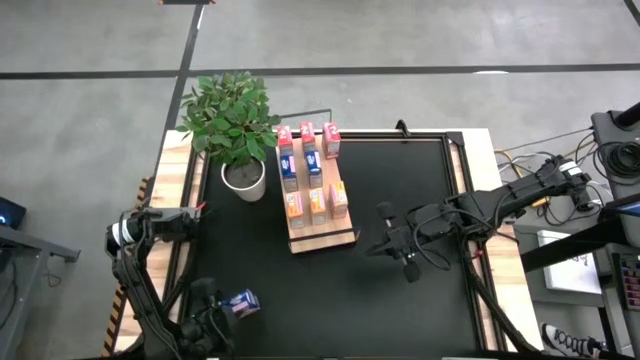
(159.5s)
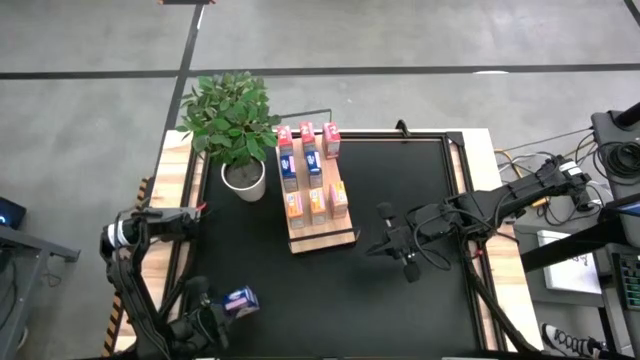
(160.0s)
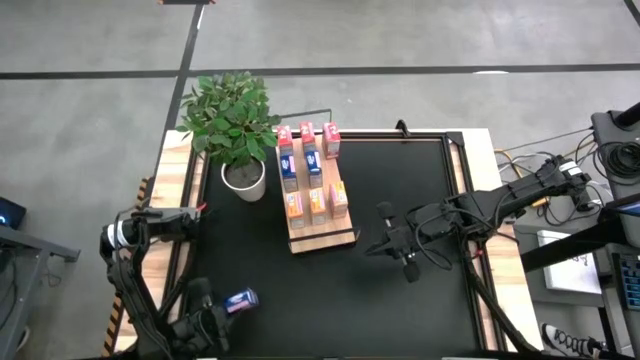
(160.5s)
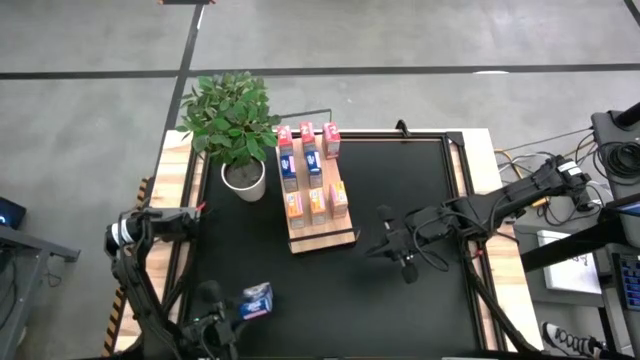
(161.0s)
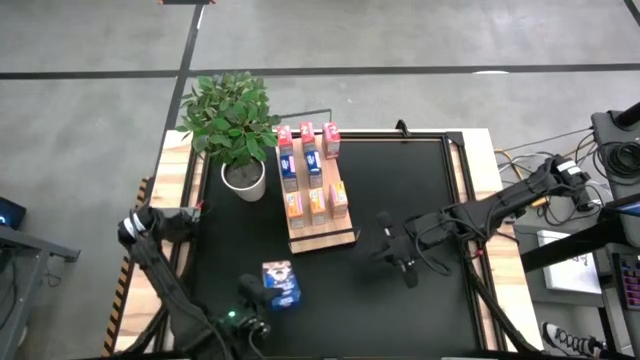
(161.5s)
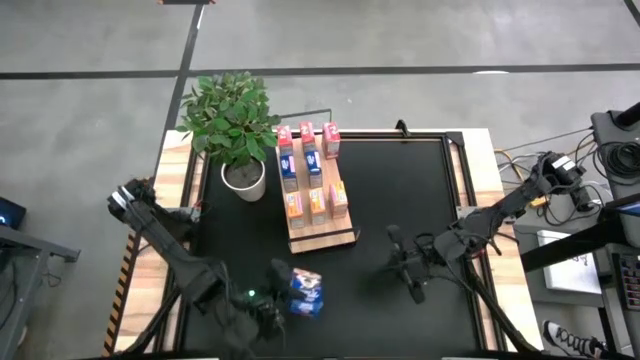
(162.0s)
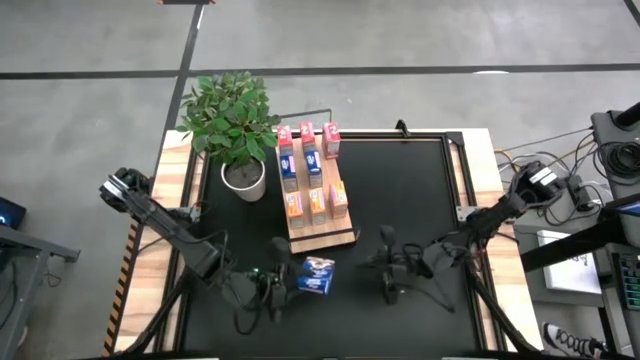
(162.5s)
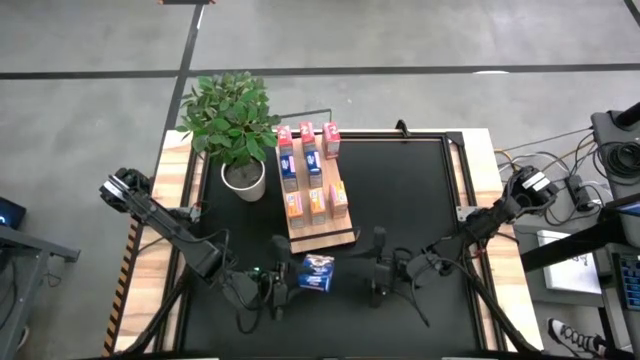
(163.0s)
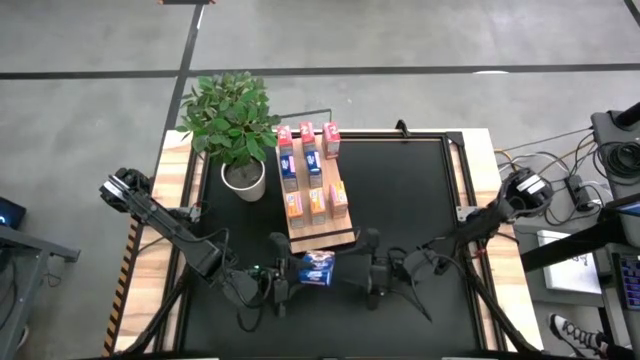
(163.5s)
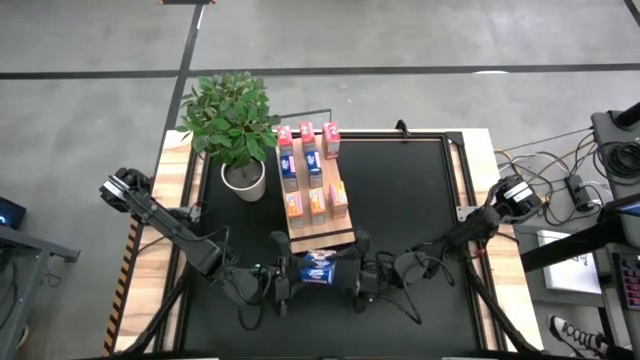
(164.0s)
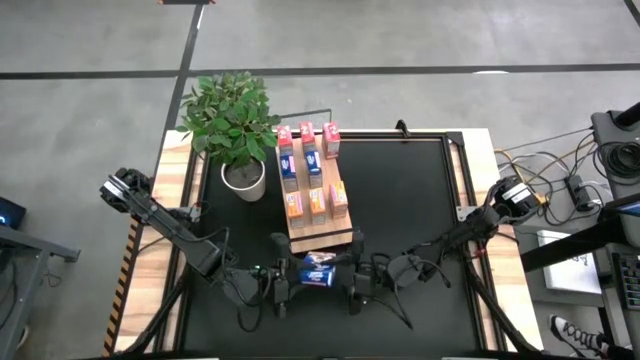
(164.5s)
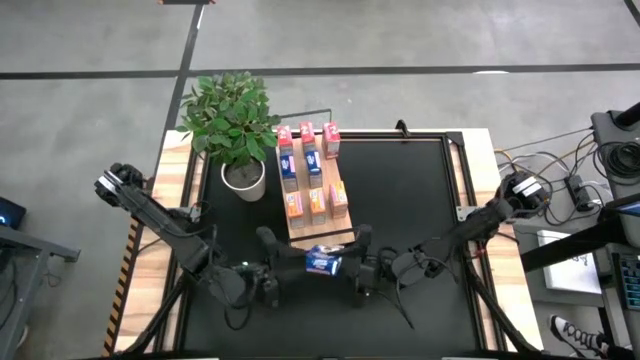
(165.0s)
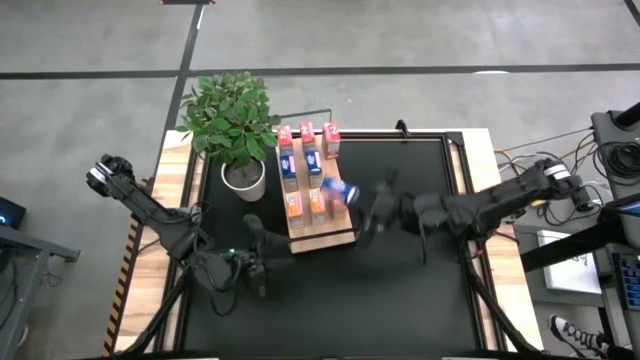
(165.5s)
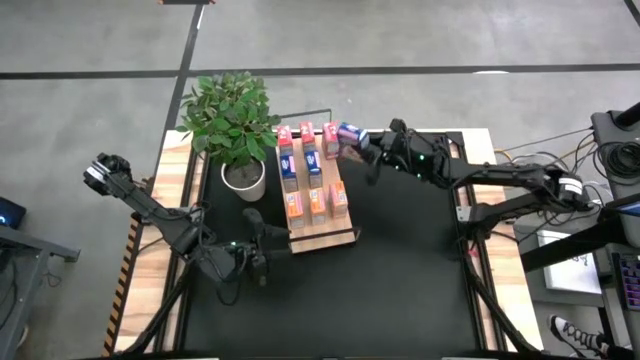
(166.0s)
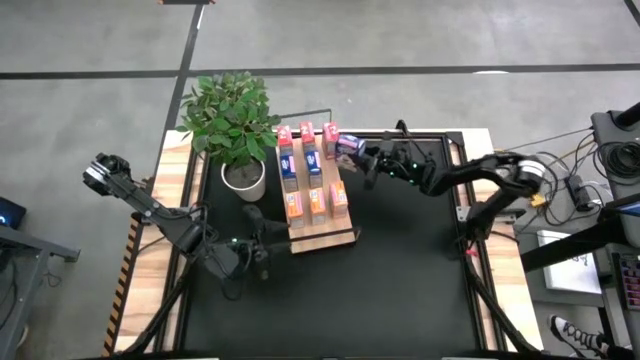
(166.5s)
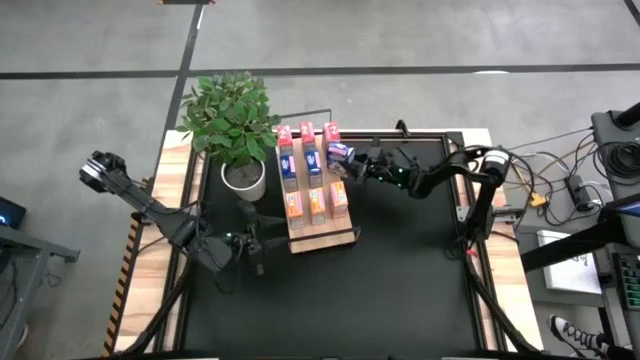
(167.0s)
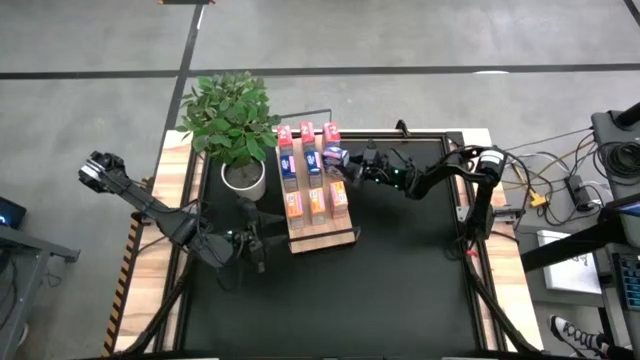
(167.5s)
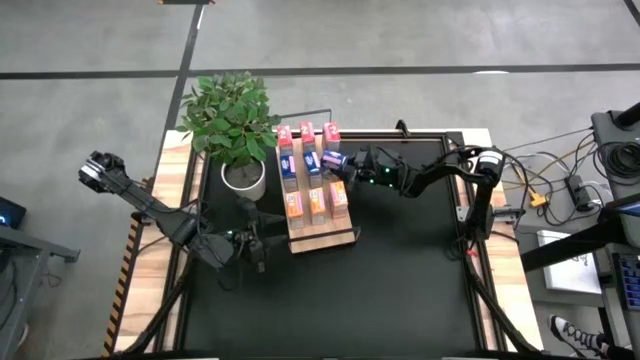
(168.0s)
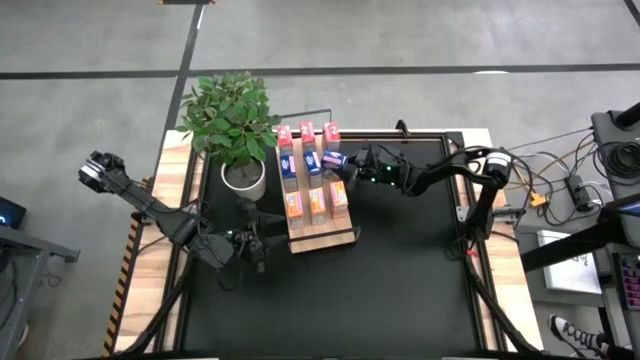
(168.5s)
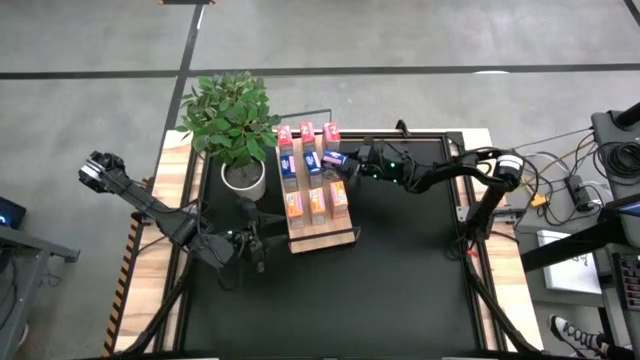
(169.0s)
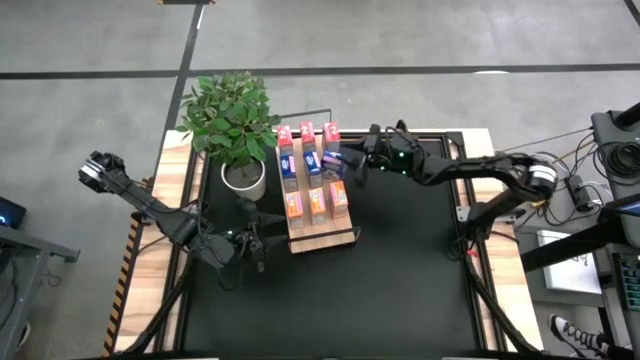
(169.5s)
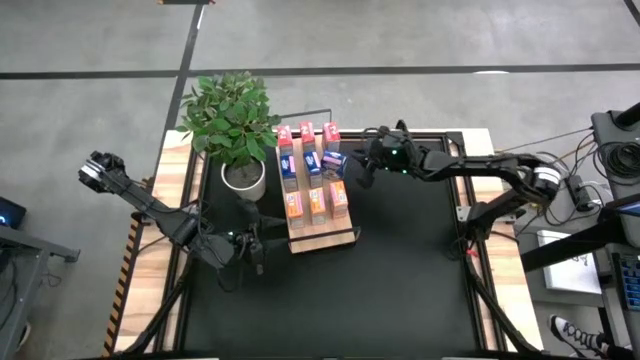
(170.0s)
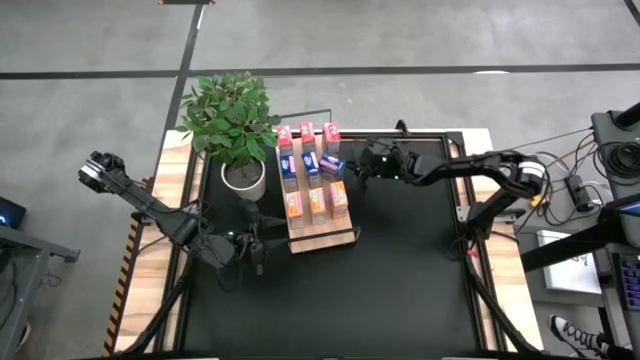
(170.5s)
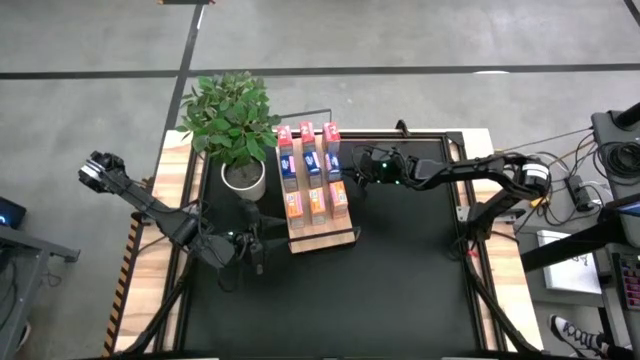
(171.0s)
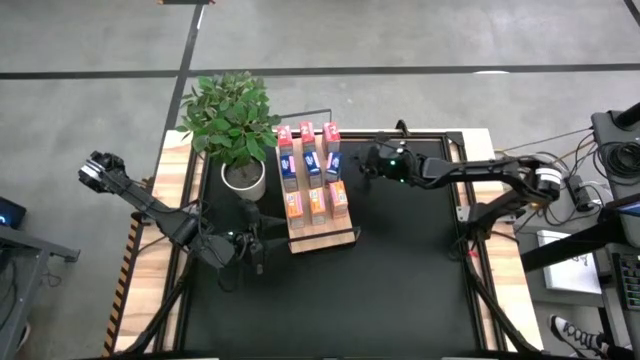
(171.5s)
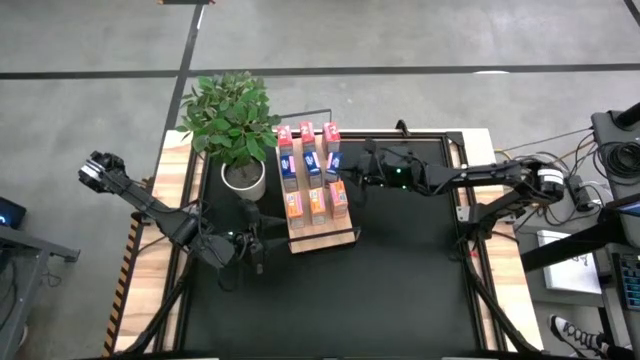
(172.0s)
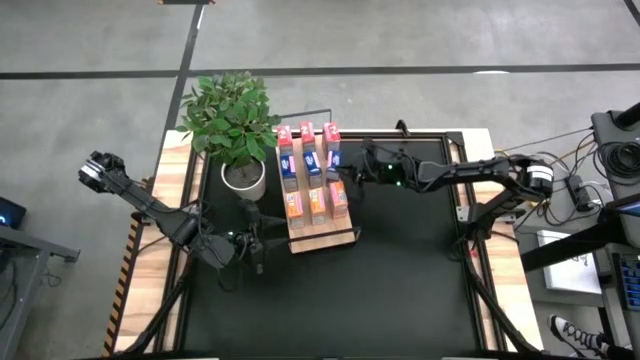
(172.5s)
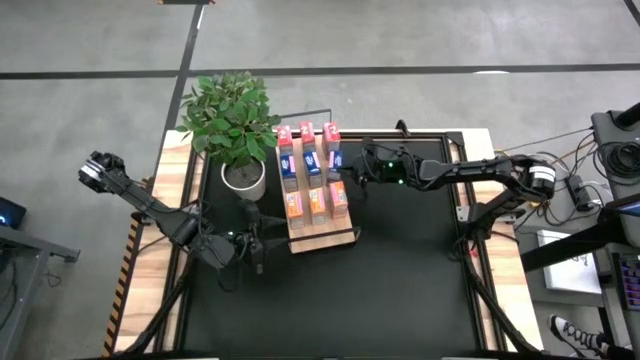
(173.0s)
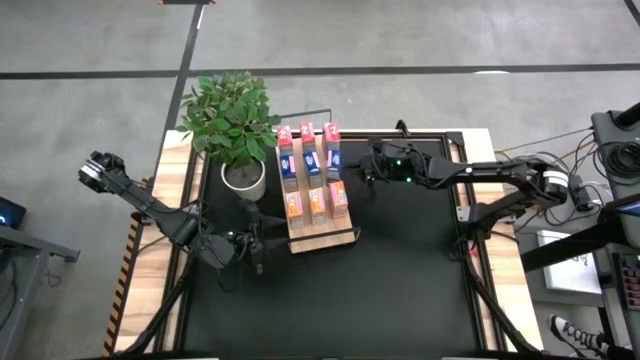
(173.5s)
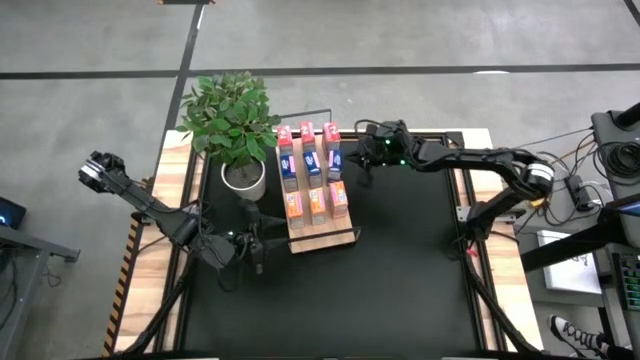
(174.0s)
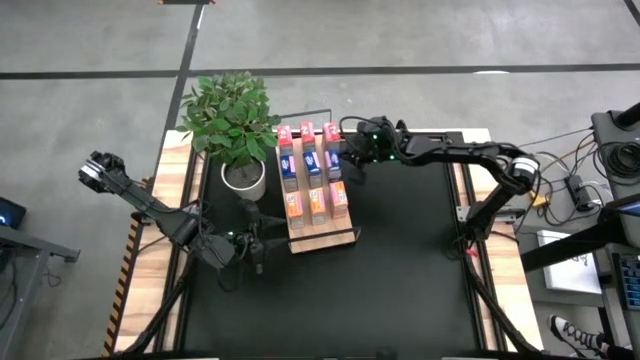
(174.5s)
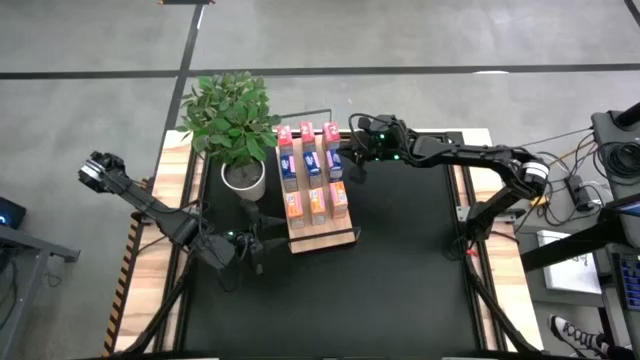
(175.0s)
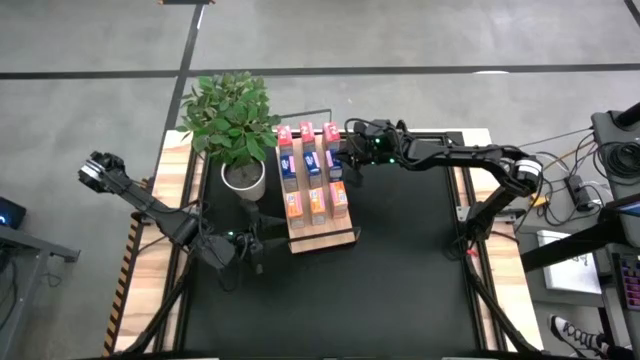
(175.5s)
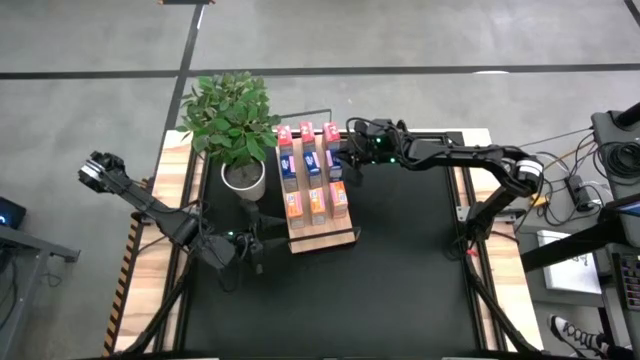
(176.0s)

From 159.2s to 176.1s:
Task: Stack cereal on shelf
Put the blue cereal box on the shelf aligned with the other blue cereal boxes

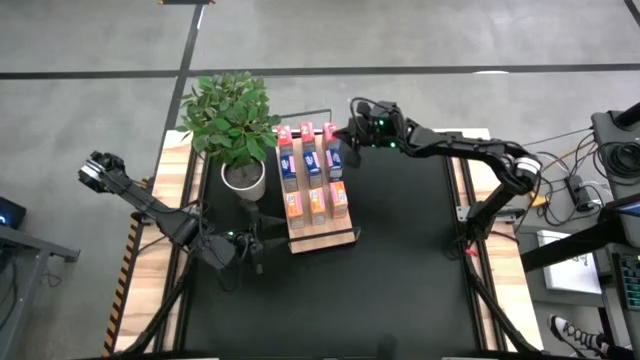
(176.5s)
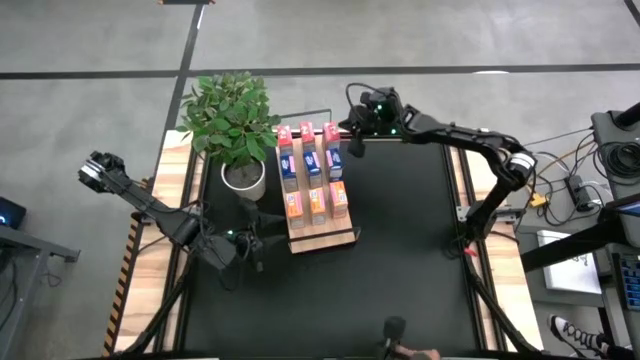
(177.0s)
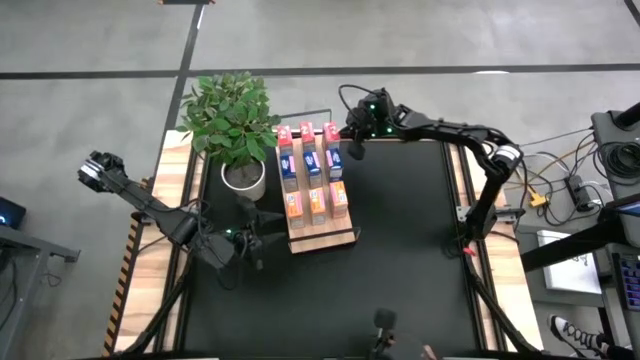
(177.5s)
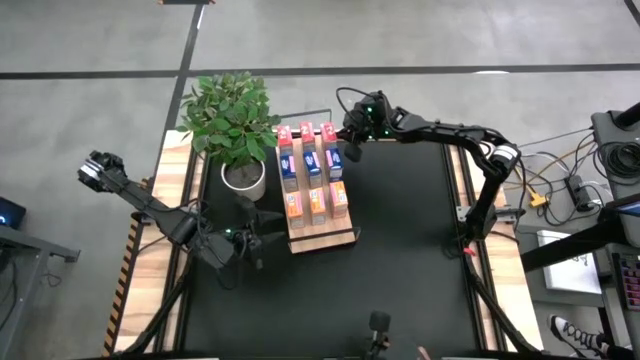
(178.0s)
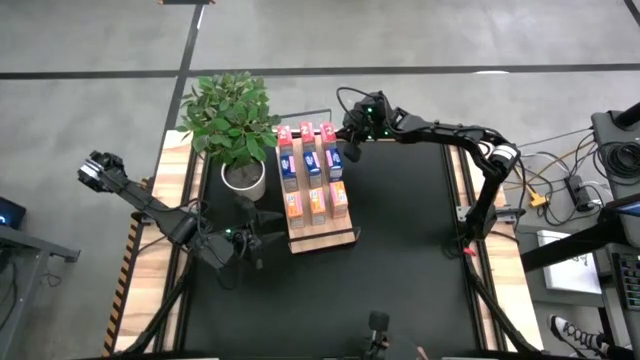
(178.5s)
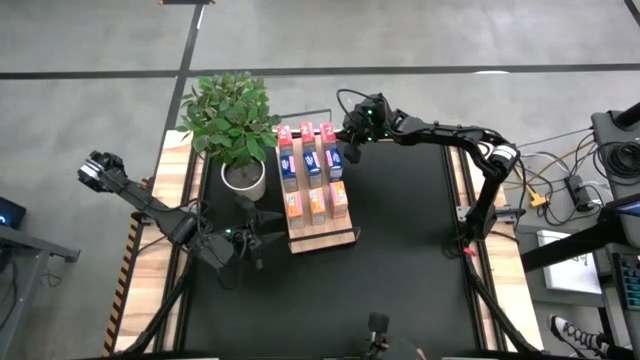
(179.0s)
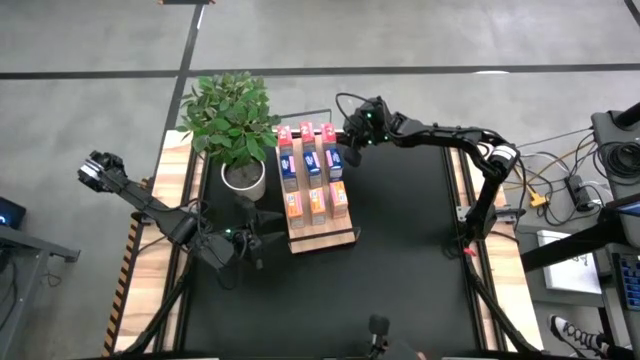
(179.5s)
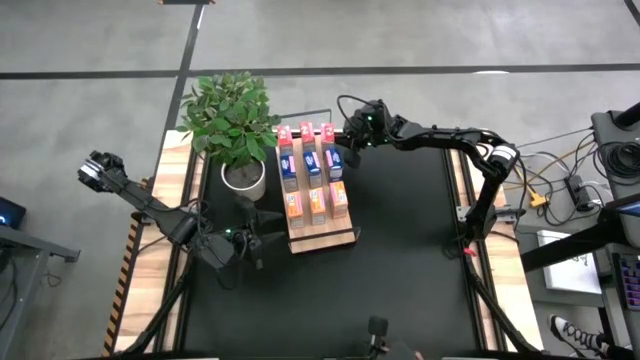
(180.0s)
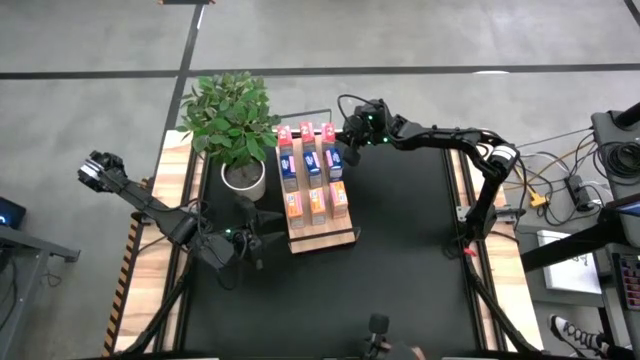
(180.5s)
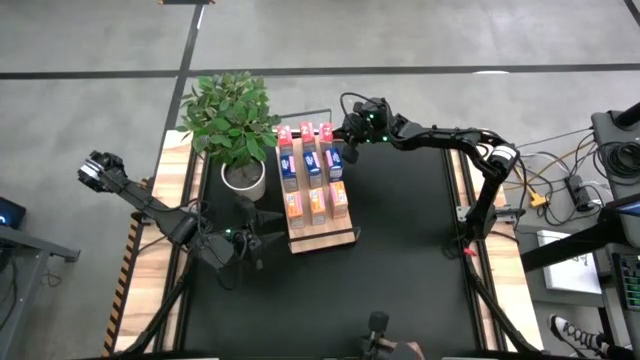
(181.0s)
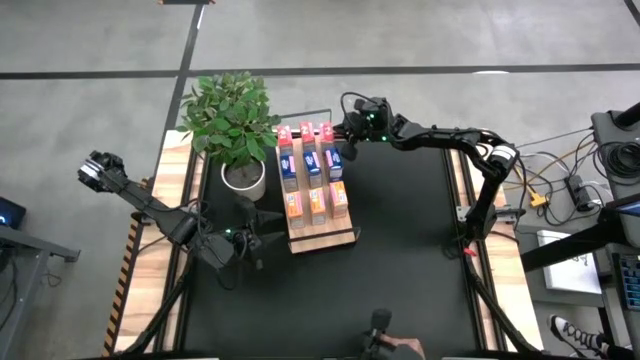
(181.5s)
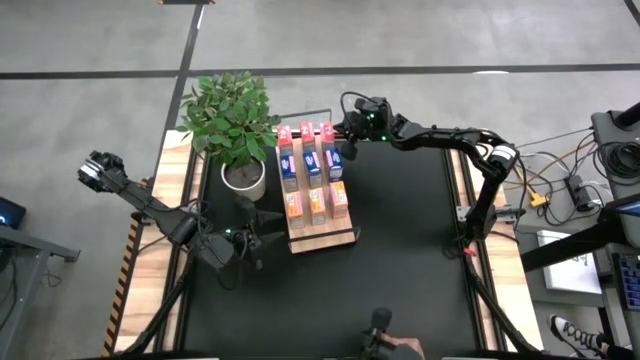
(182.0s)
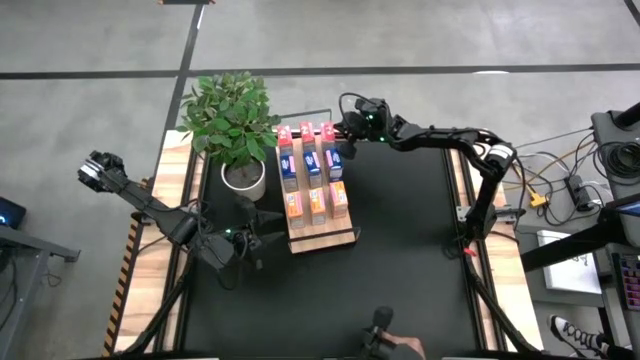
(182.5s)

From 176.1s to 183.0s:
Adjust the red cereal box on the shelf
